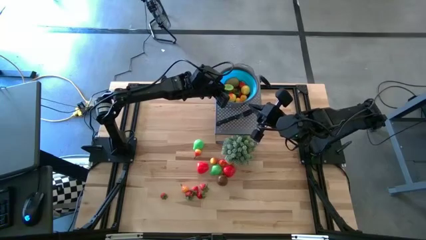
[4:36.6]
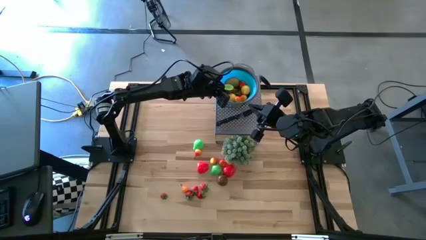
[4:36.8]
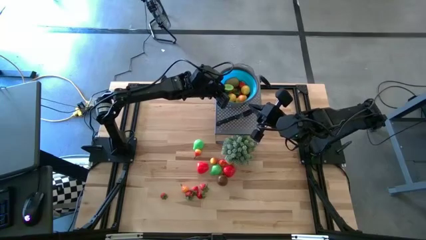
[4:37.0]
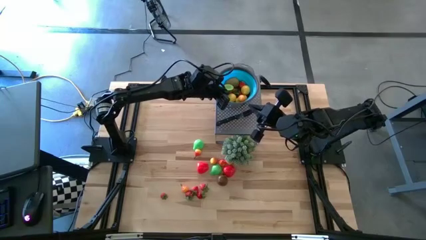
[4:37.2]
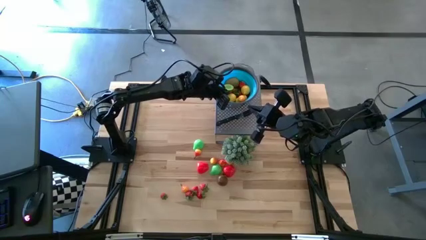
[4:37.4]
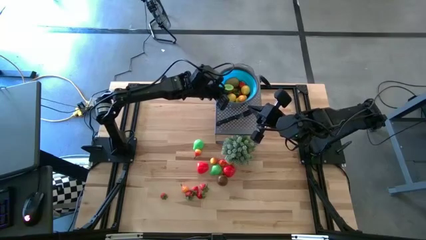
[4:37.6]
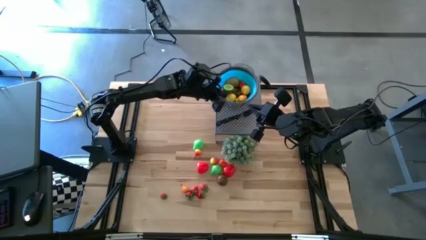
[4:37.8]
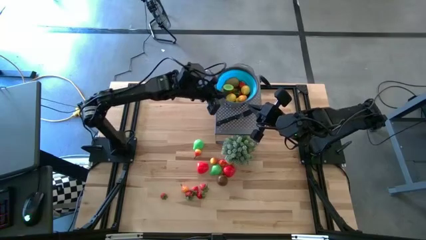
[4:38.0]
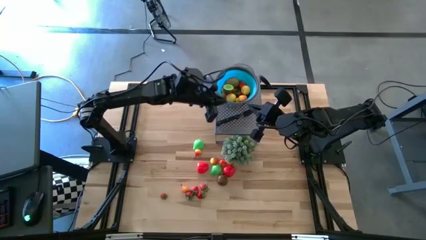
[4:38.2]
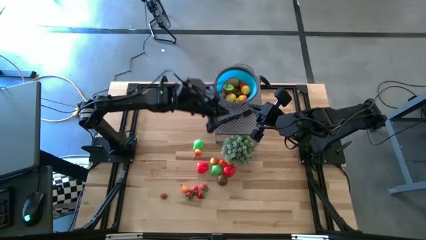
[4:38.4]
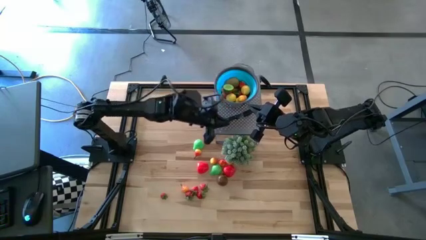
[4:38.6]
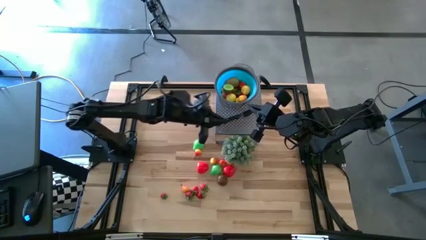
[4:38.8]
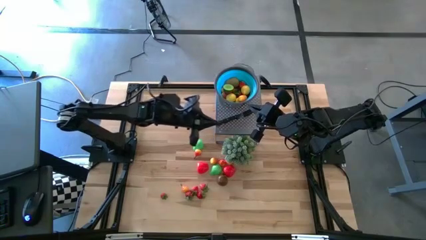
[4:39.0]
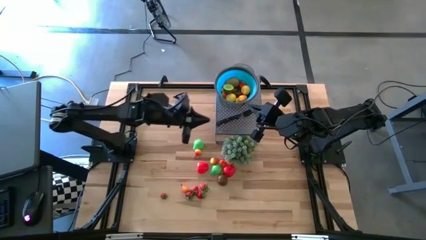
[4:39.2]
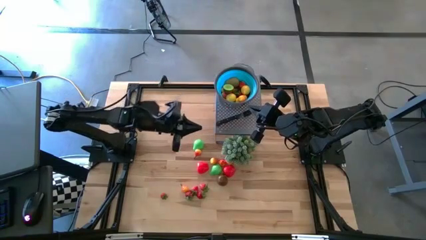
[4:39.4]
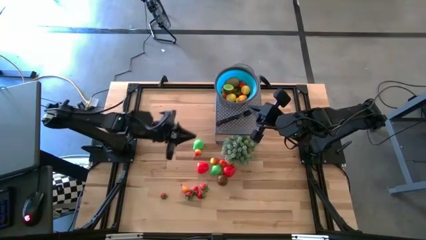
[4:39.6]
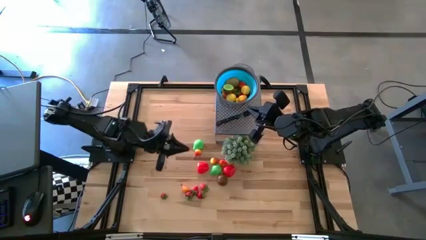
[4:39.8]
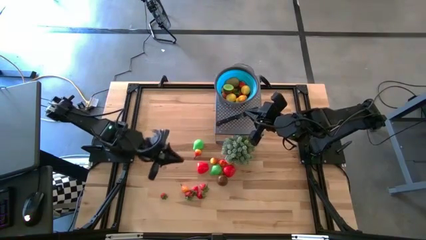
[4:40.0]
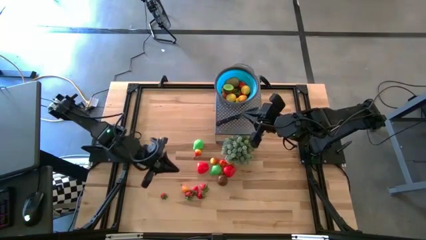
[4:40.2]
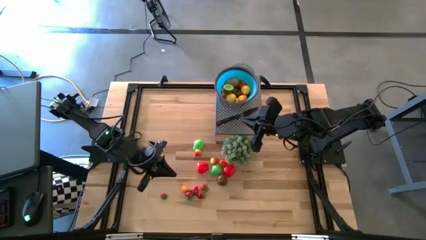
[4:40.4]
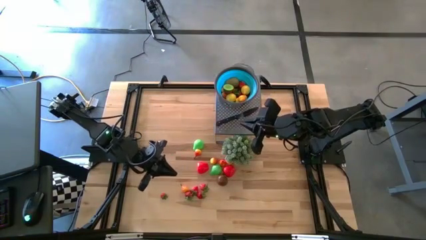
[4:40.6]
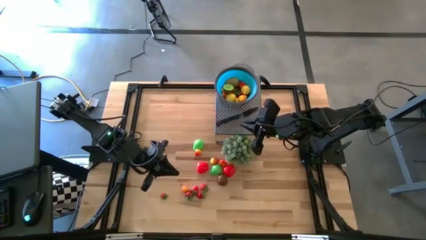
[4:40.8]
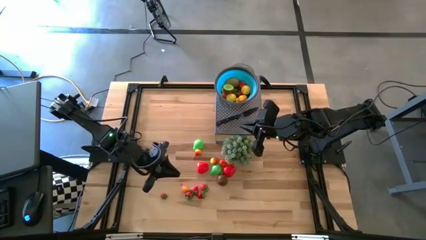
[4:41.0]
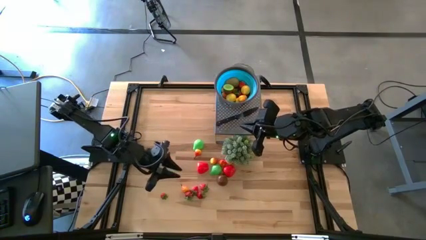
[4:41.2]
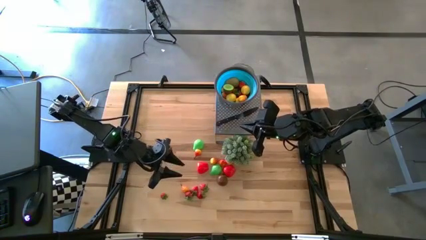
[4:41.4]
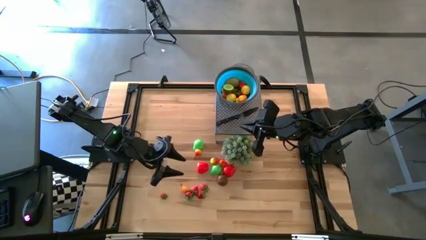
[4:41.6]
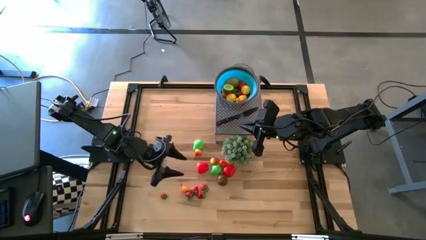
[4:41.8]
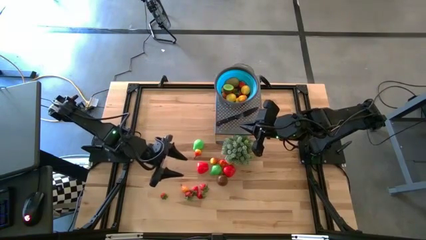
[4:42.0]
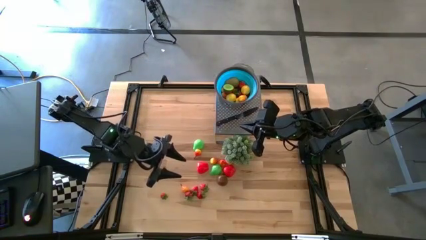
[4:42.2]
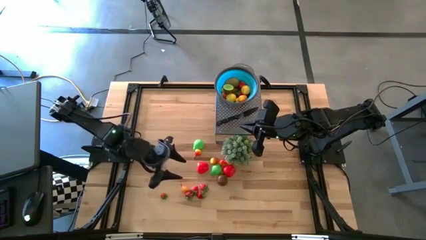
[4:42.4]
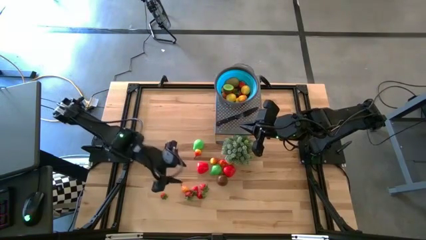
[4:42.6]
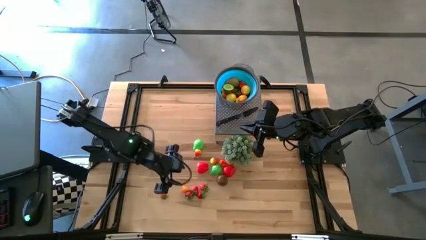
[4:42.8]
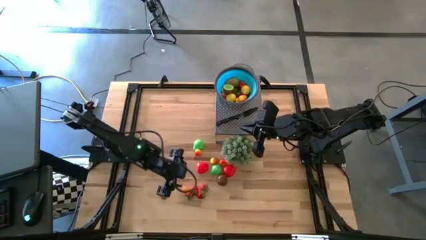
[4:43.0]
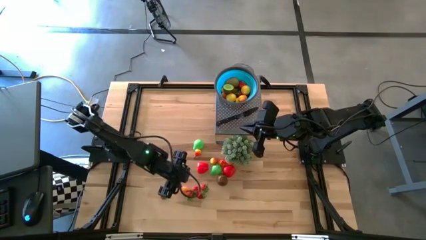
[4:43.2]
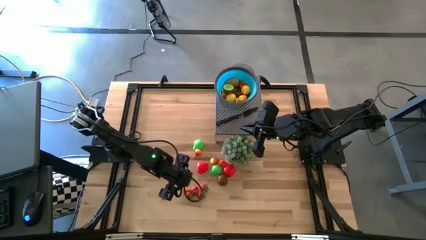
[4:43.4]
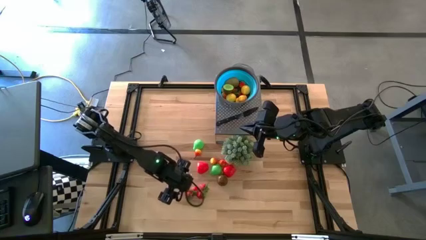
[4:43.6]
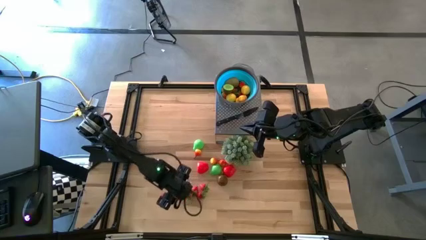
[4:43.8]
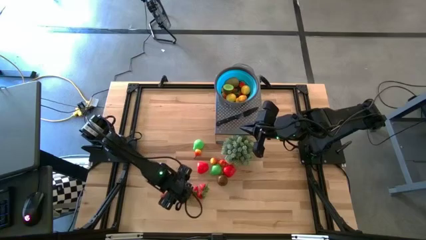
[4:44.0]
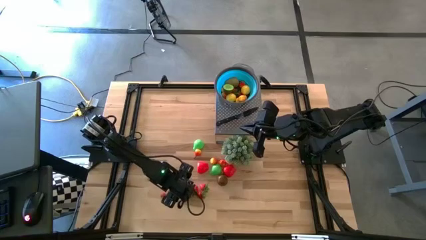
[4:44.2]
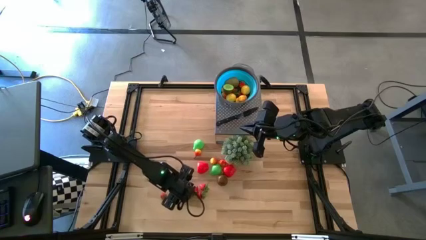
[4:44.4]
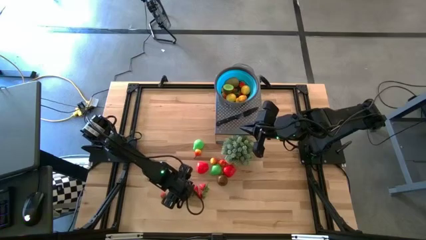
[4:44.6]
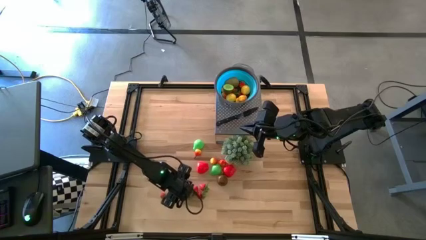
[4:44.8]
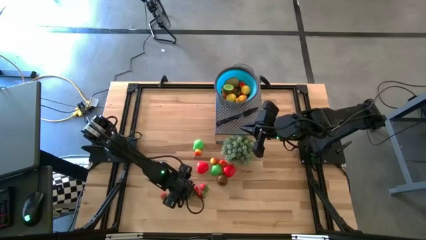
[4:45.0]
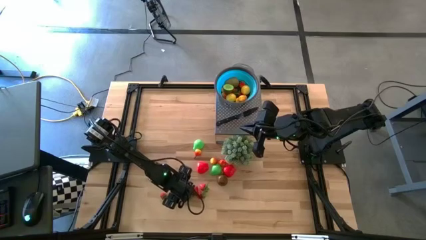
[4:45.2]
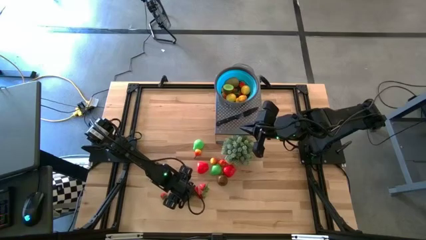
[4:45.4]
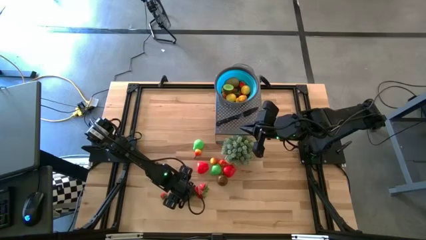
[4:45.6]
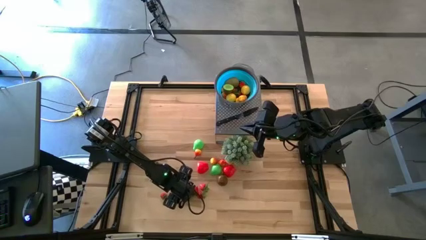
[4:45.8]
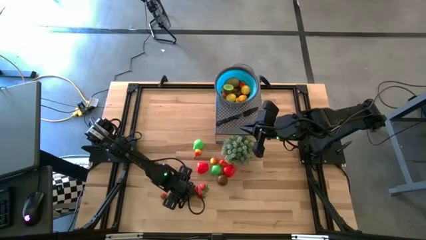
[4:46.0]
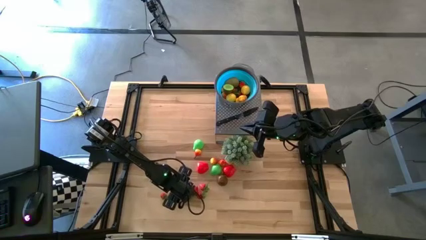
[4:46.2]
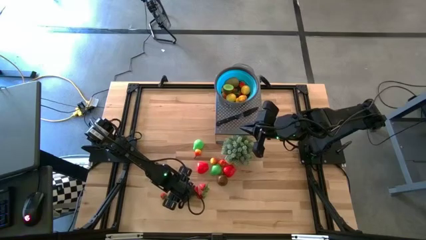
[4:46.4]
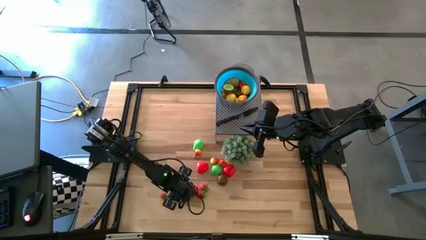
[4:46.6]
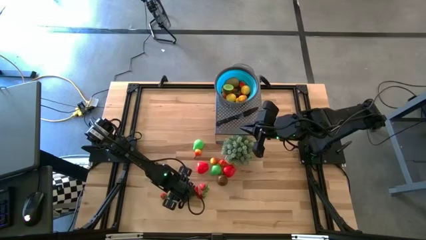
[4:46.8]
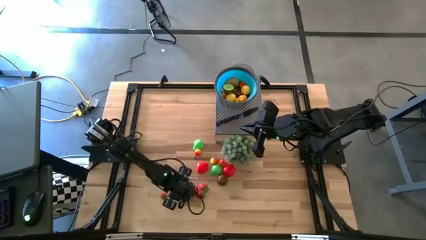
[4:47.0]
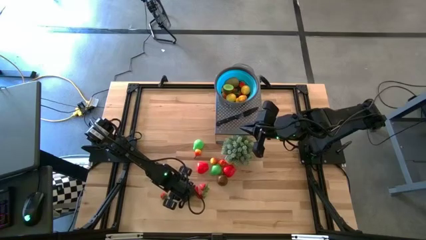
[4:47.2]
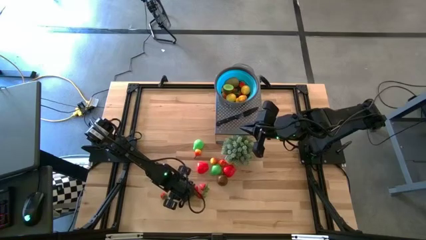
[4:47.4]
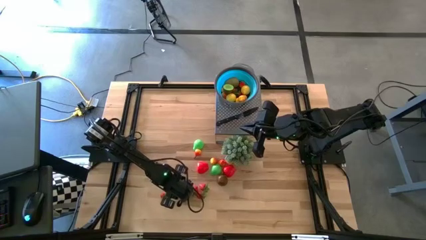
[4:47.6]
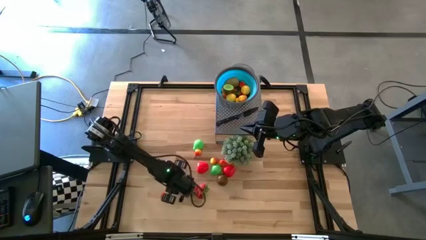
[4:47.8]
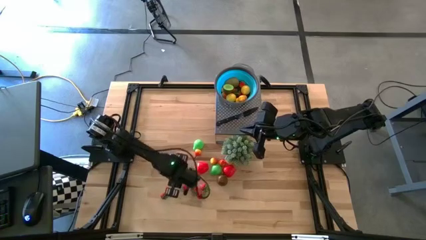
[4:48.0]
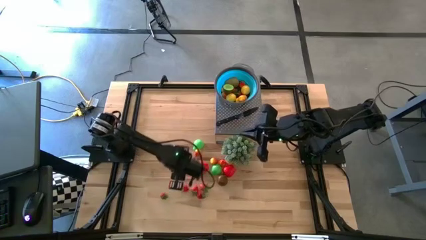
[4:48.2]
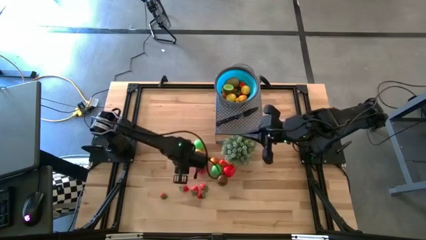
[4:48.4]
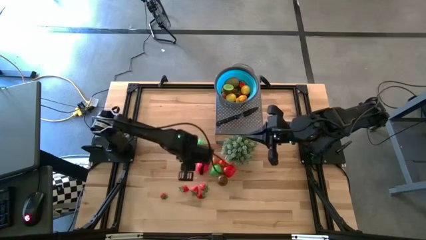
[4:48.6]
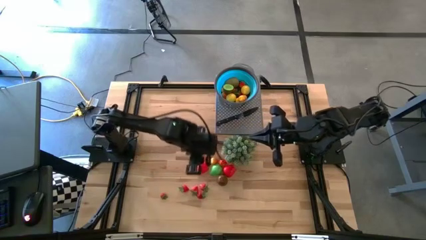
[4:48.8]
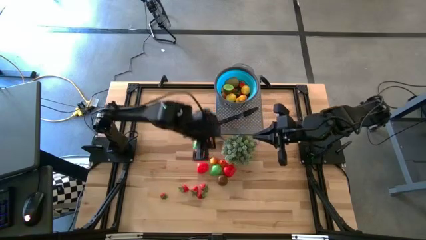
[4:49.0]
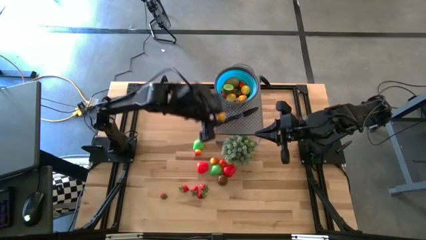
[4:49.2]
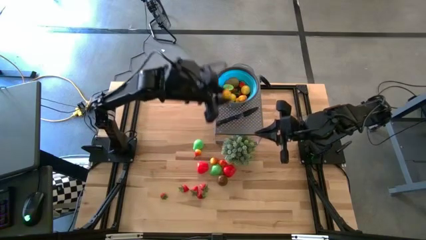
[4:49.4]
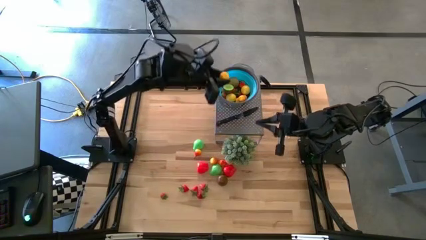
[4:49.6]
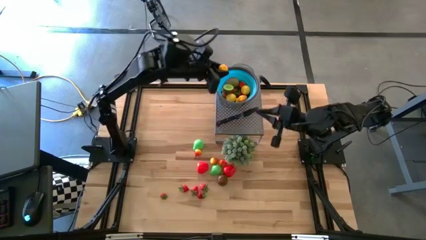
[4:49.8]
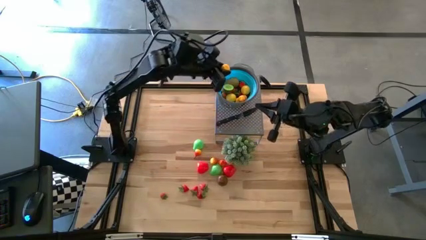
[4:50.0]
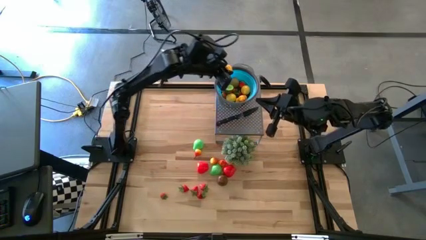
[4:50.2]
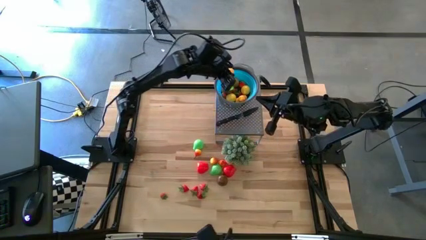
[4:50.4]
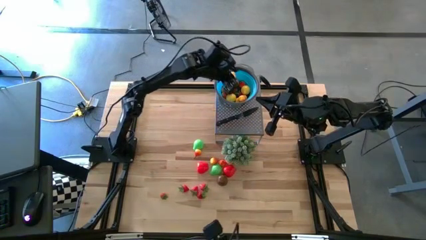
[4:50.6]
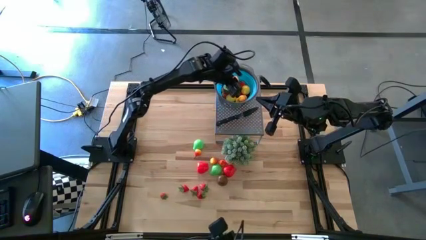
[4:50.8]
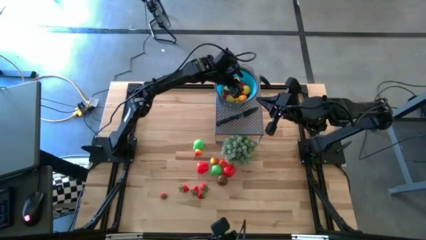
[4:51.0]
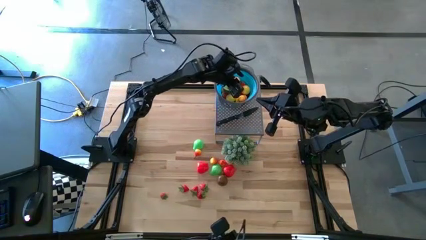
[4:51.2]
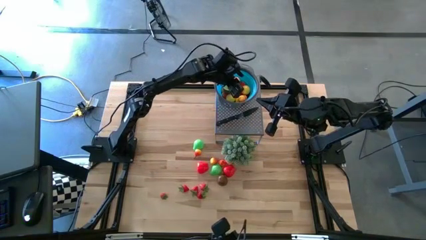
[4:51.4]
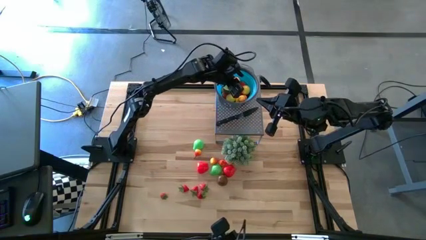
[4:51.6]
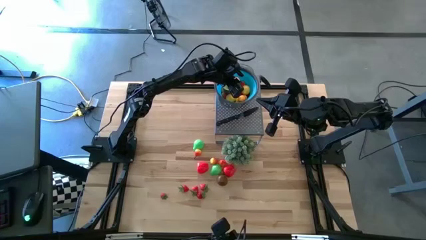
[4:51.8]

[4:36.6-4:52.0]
Task: Pick & Place Fruit
Put the orange pear into the blue strainer bowl

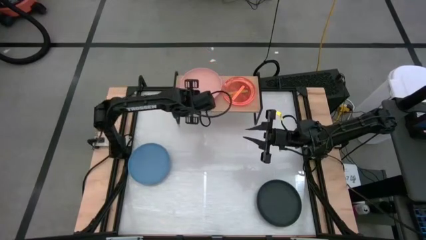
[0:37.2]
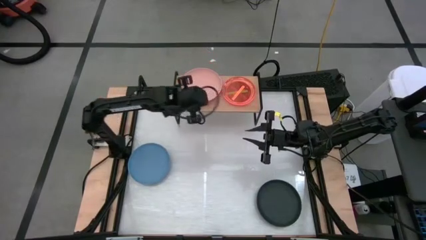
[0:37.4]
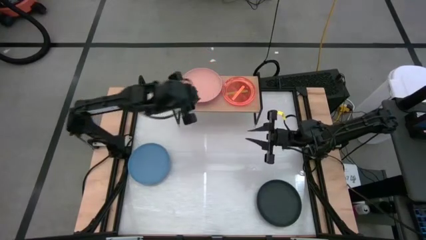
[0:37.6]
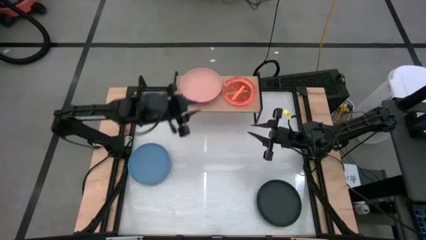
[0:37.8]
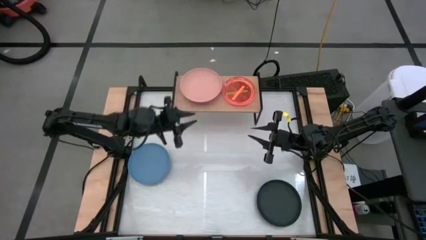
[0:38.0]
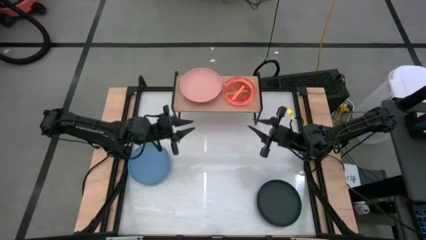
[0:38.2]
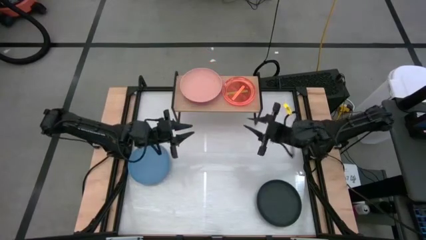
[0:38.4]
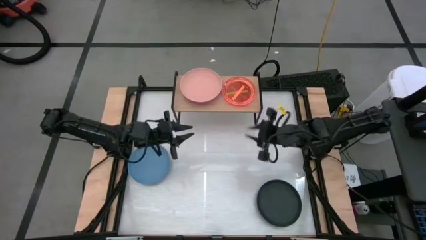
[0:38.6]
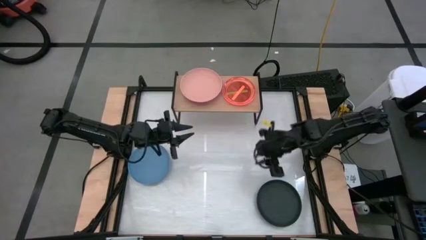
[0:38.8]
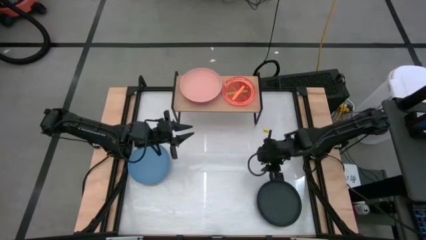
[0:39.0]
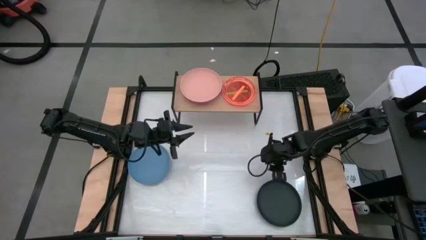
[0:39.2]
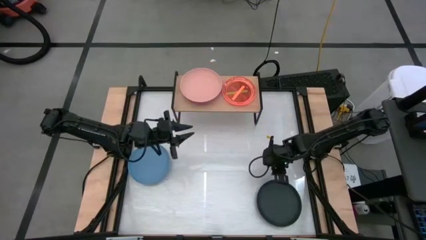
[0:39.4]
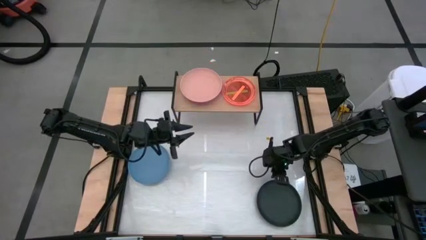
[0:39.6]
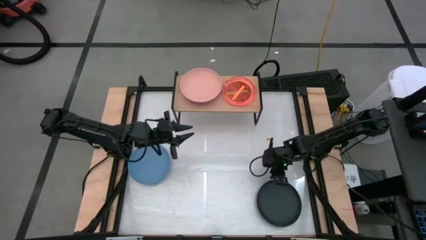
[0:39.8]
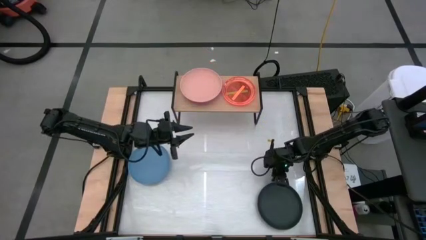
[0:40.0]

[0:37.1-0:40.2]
Task: Place and stack plates onto a shelf
Stack the black plate on top of the brown plate on the shelf
